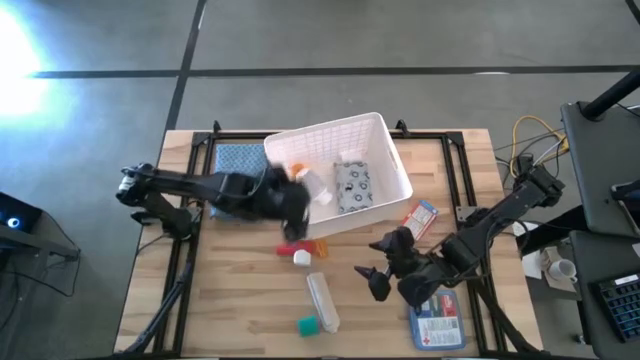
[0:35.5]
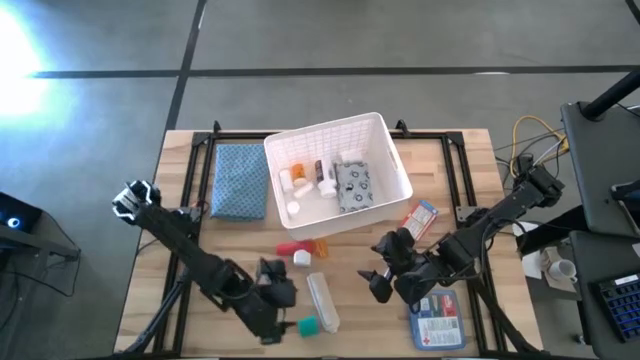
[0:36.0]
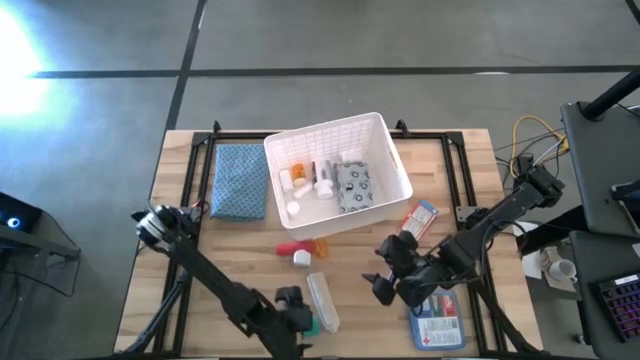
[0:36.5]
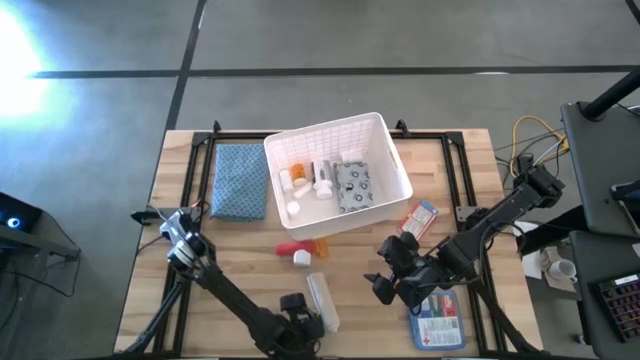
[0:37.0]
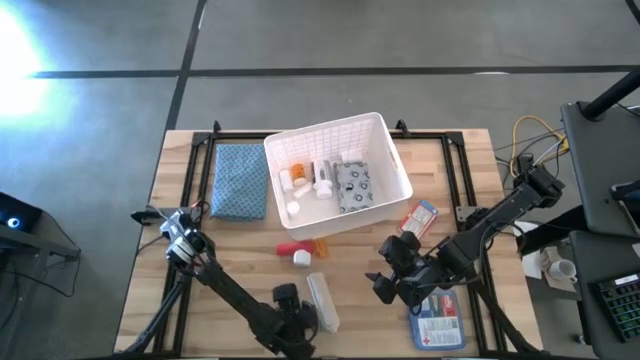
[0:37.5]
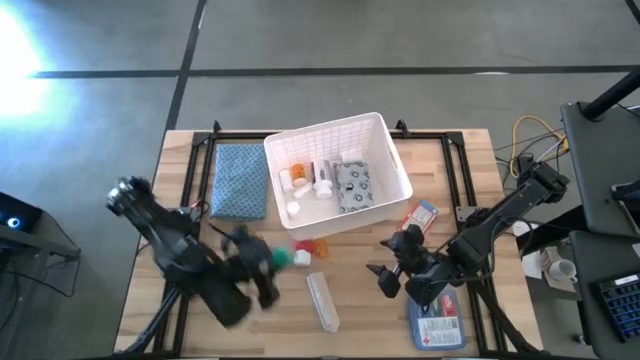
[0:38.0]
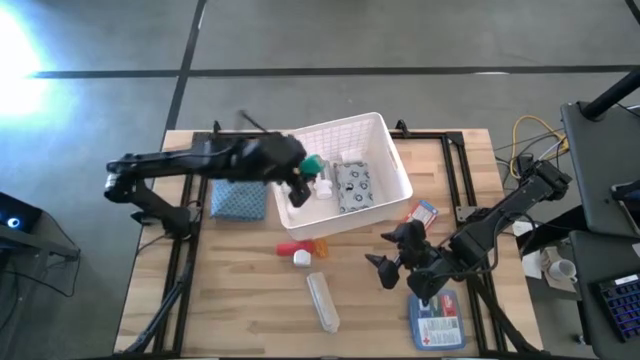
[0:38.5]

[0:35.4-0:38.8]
Task: Pick & place medical supplies in basket/bin
Put the green bandage into the white bin

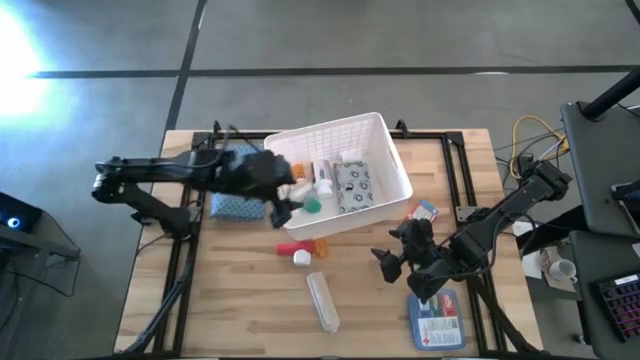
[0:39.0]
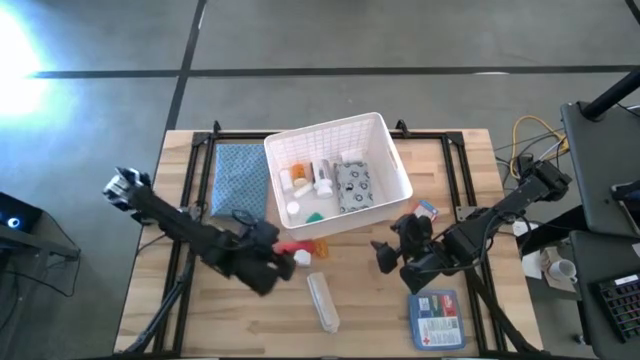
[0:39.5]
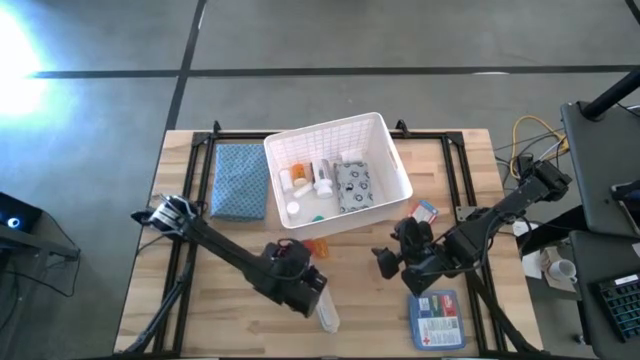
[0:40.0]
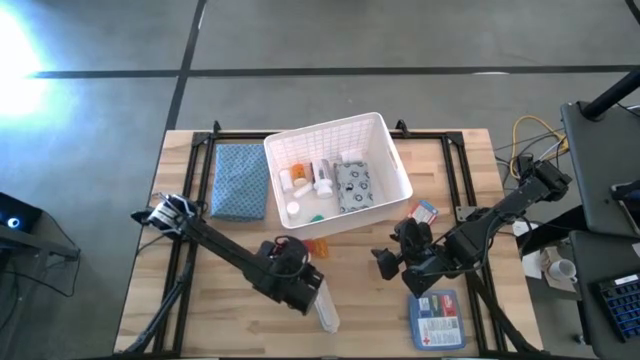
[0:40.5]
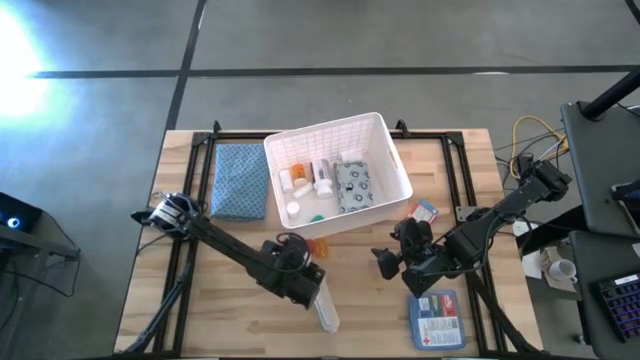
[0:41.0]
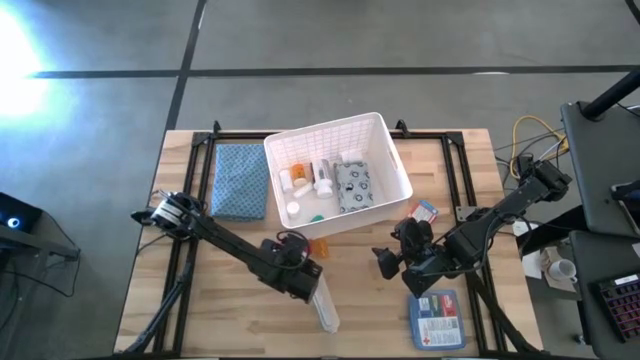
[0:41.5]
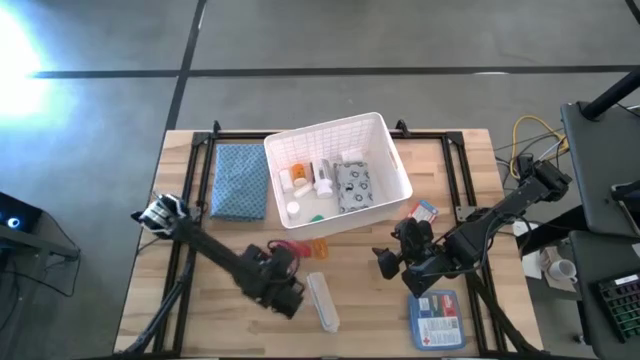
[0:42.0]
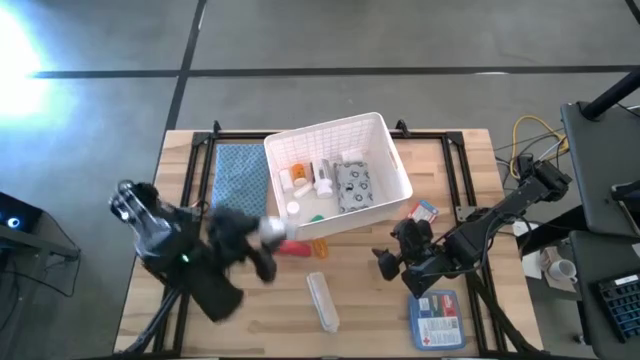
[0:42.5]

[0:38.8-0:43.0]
Put the white pill bottle into the white bin

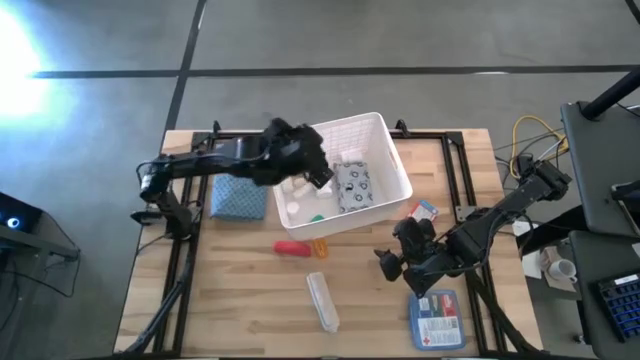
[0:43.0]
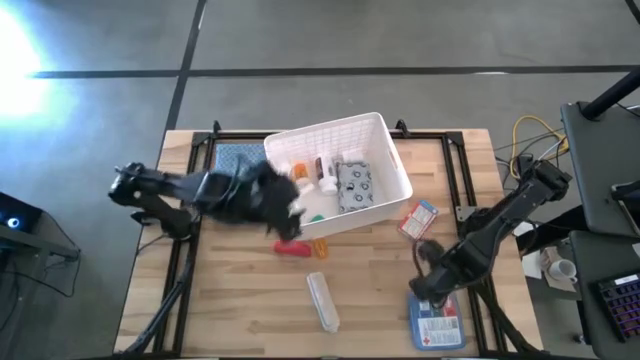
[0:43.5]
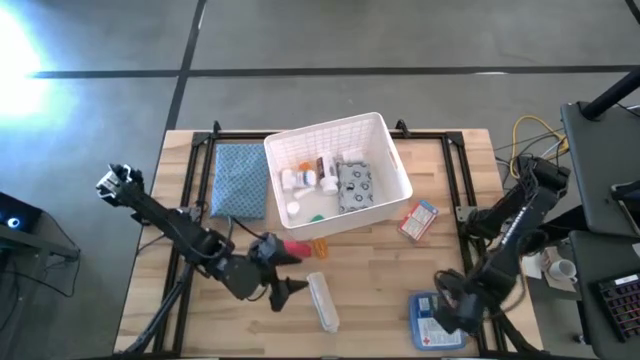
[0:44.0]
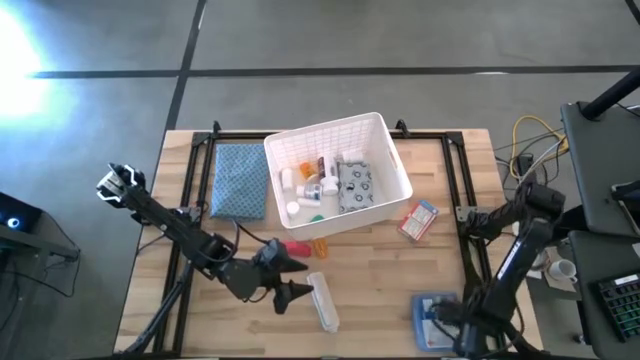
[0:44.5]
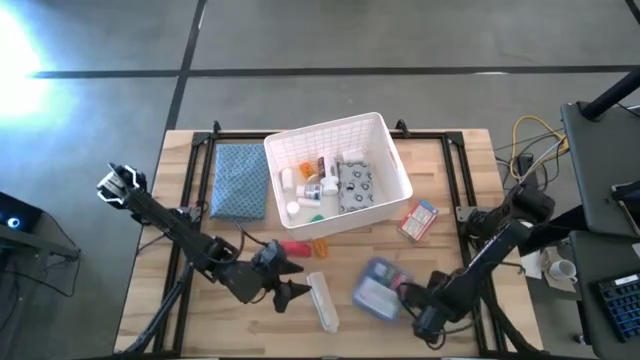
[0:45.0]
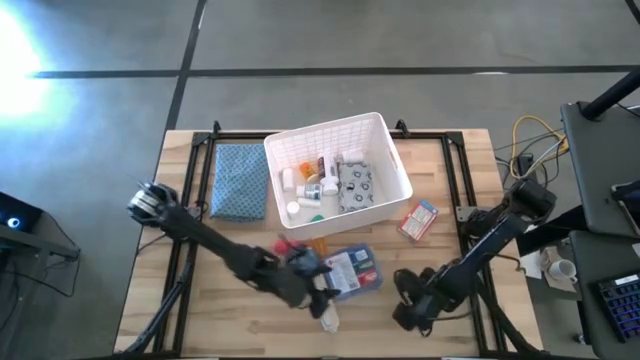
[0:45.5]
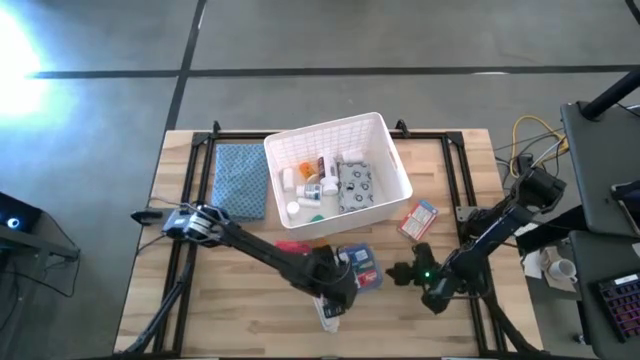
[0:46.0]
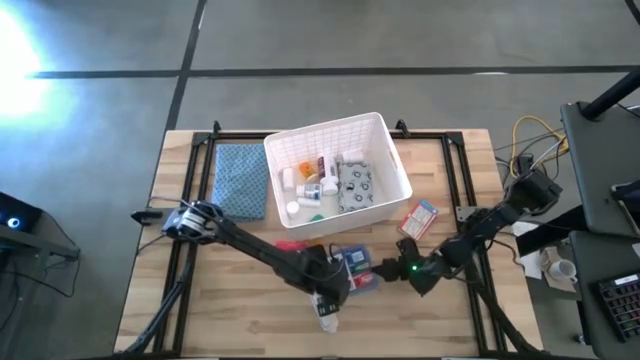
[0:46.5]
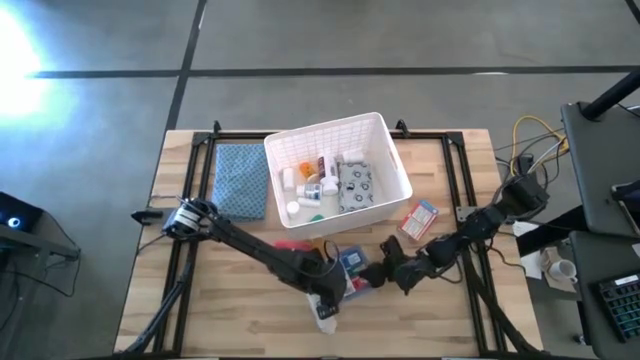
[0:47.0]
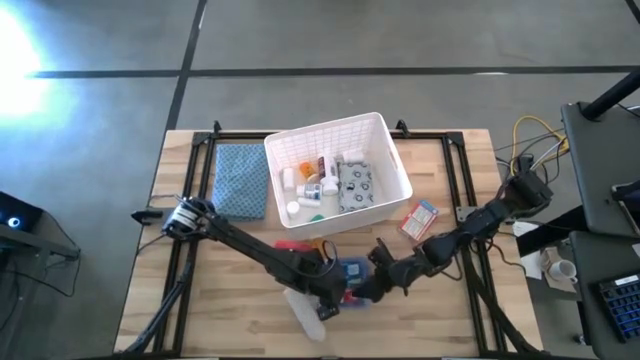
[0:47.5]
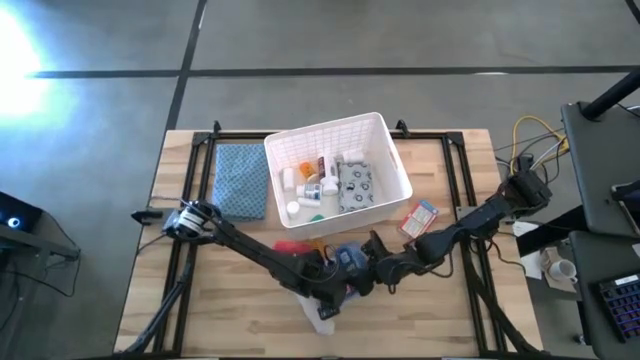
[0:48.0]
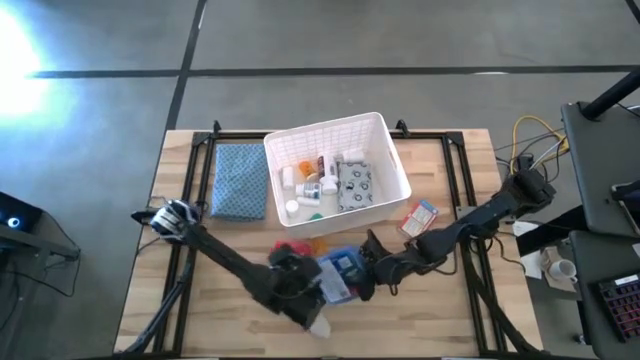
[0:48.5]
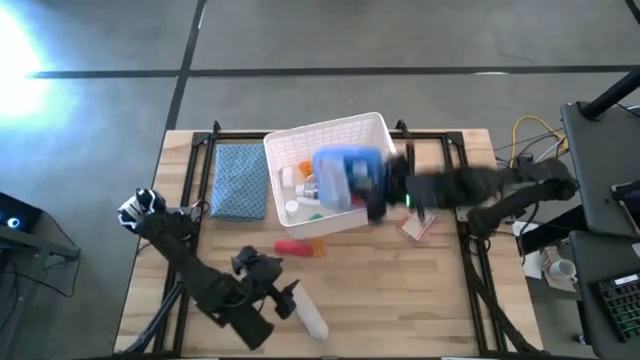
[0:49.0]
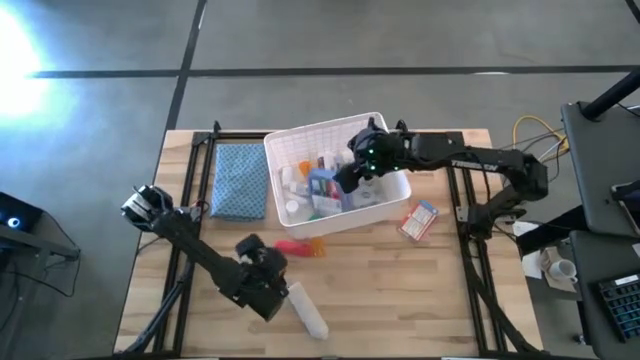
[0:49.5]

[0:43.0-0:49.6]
Put the medicine kit into the white bin

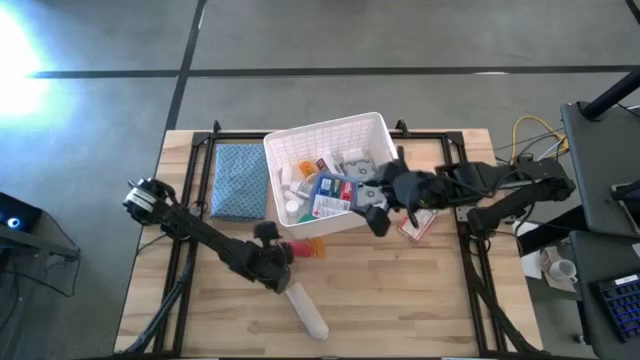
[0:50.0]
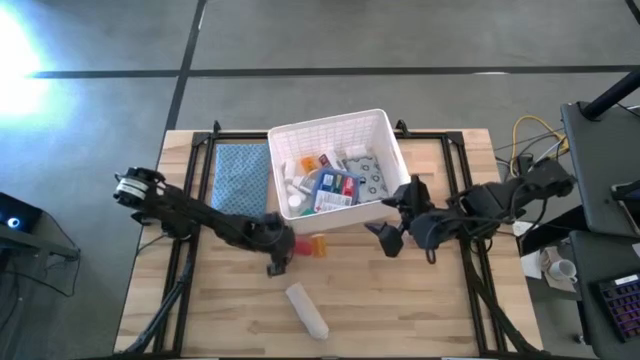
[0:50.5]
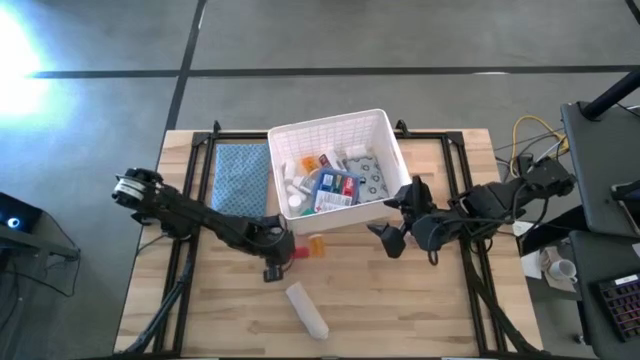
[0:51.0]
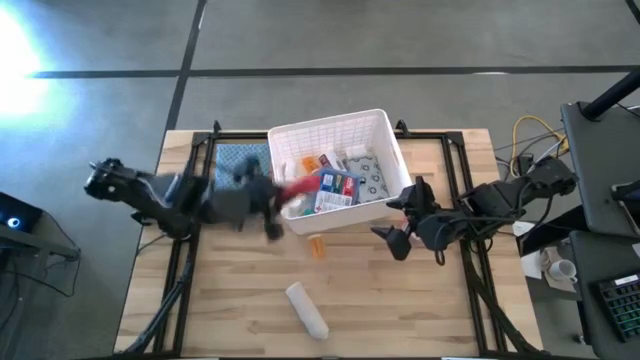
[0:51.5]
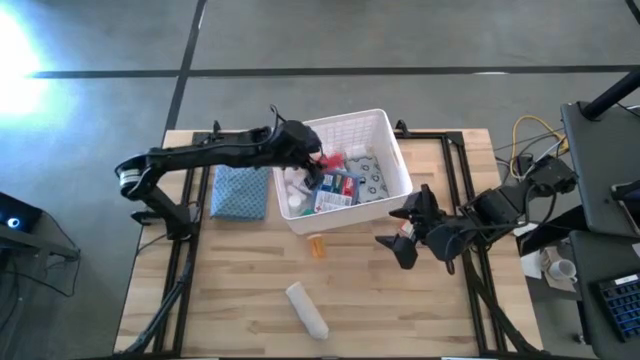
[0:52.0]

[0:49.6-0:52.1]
Put the red bandage into the white bin

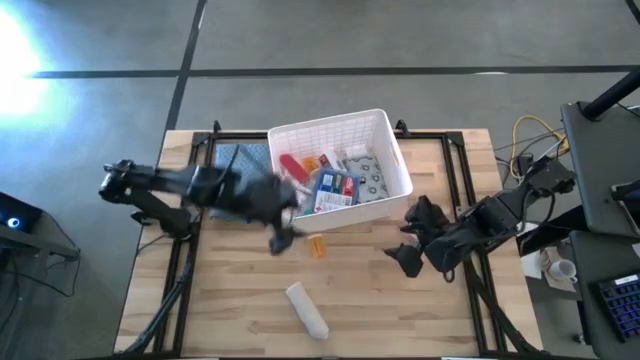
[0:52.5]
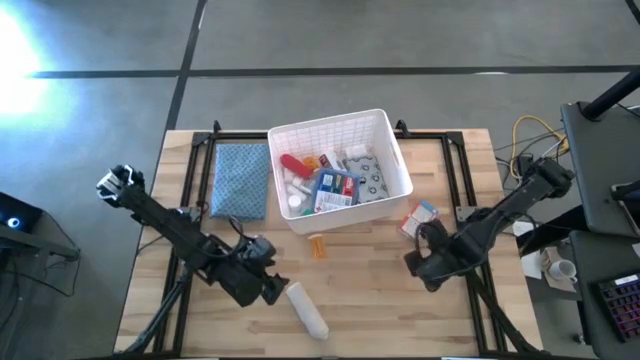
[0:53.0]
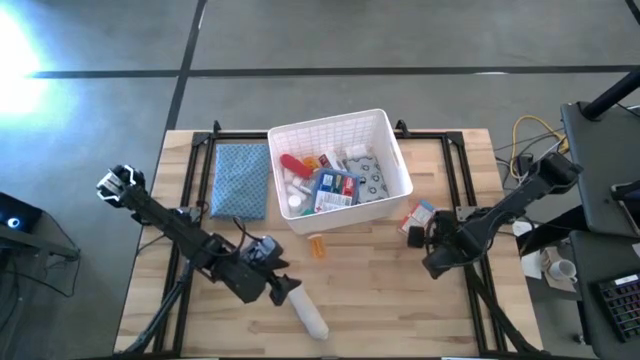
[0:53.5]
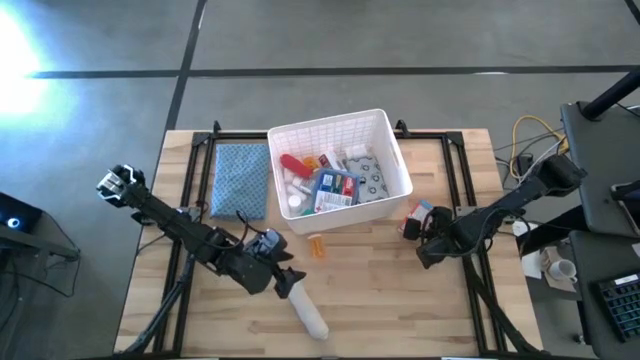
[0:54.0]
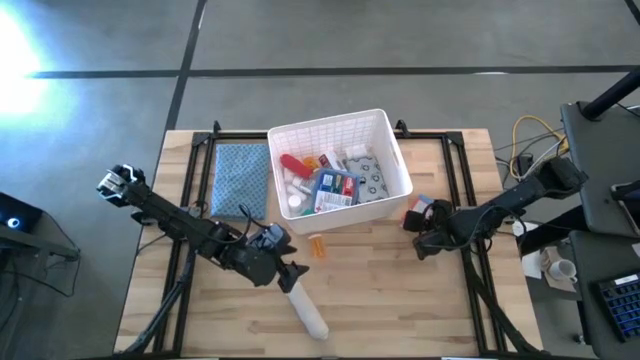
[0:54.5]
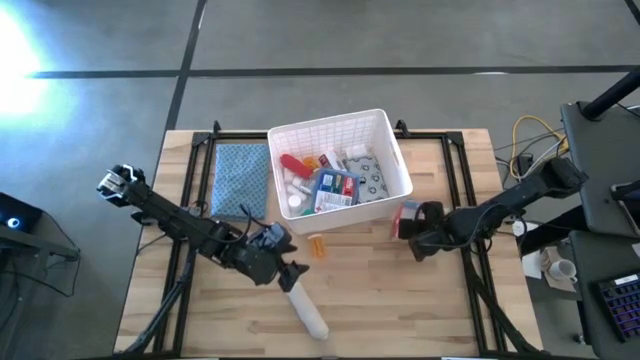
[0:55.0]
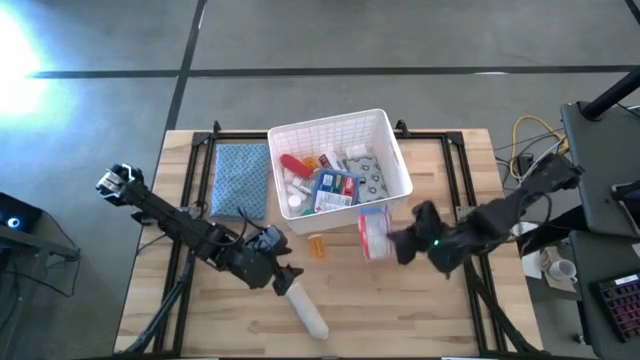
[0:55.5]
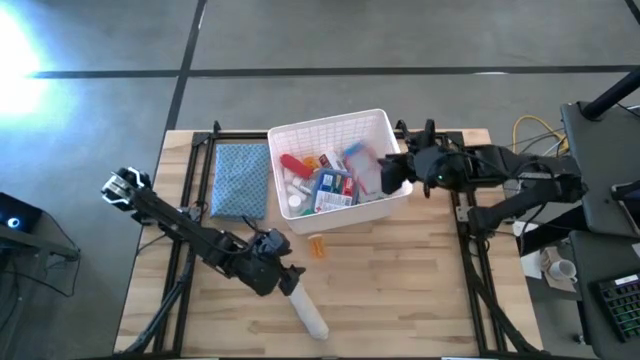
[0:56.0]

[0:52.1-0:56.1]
Put the medicine box into the white bin

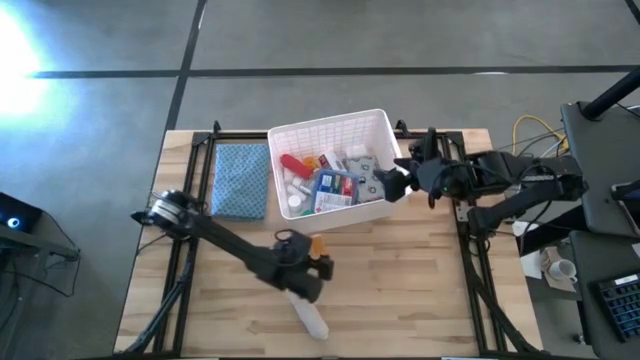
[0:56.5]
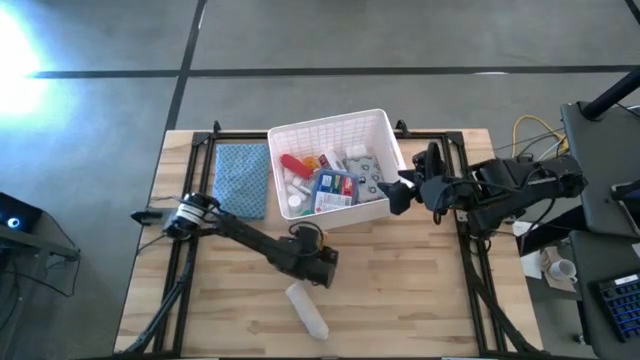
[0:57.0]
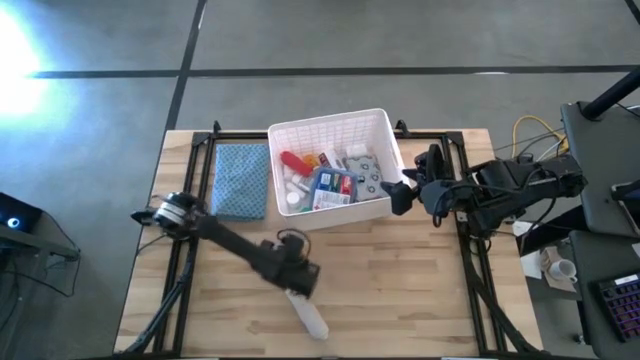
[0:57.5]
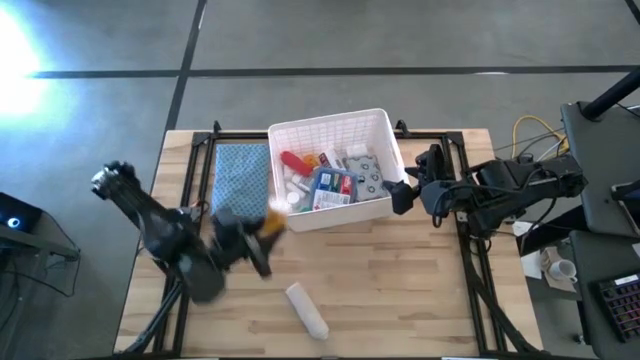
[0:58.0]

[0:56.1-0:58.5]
Put the orange pill bottle into the white bin
